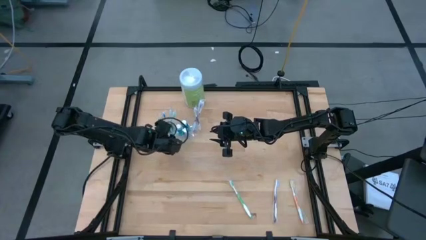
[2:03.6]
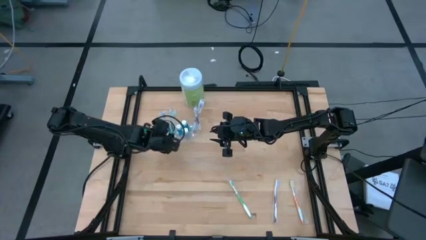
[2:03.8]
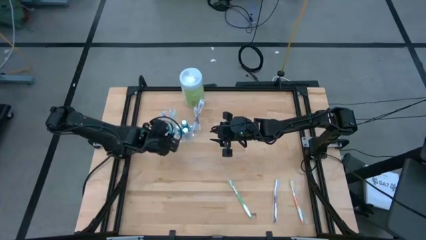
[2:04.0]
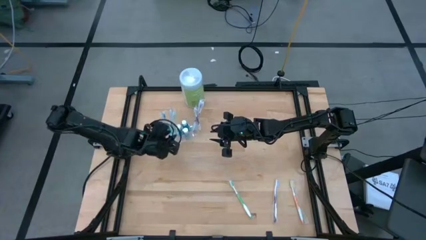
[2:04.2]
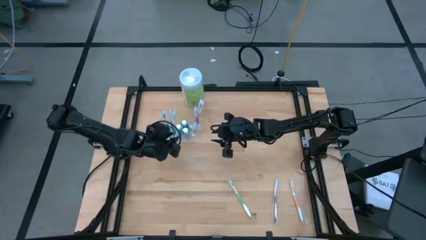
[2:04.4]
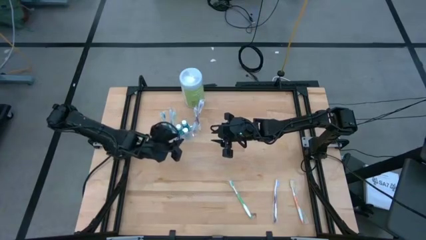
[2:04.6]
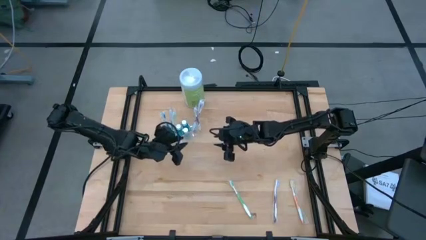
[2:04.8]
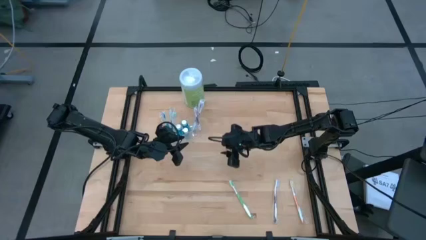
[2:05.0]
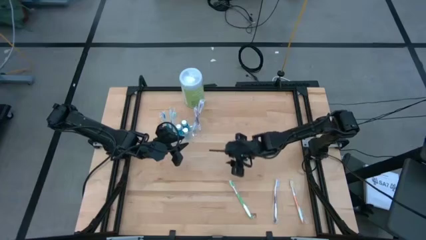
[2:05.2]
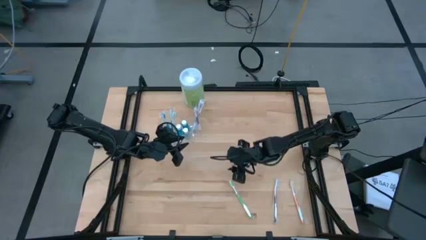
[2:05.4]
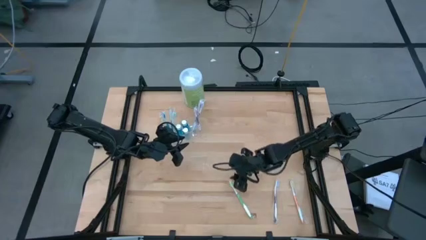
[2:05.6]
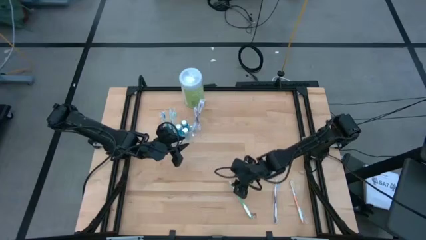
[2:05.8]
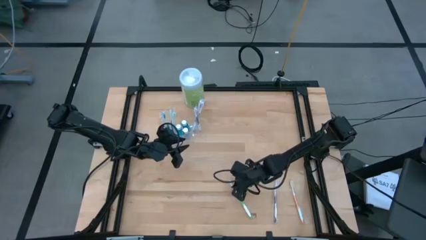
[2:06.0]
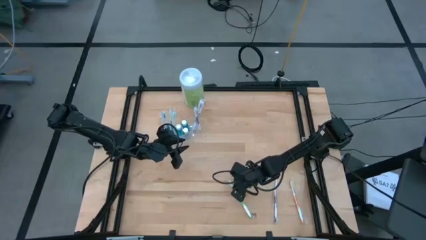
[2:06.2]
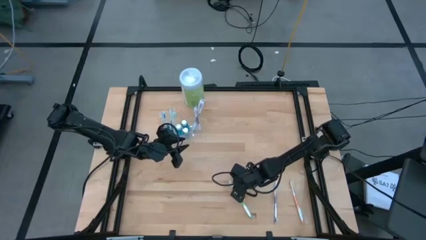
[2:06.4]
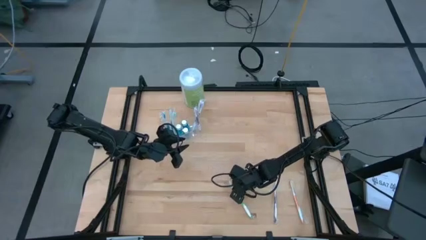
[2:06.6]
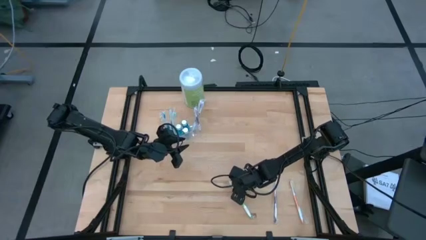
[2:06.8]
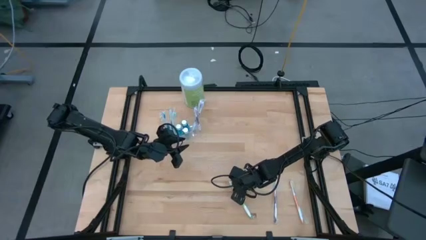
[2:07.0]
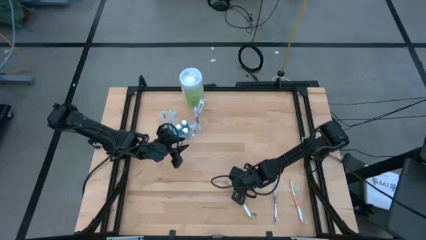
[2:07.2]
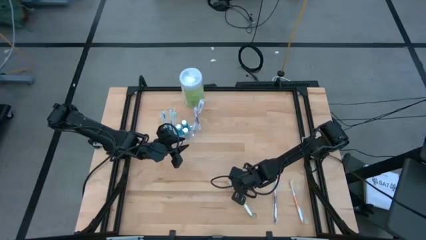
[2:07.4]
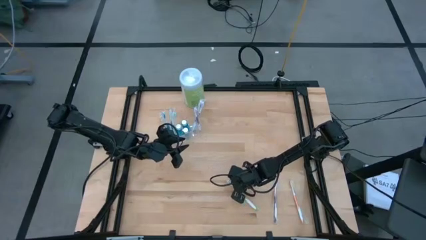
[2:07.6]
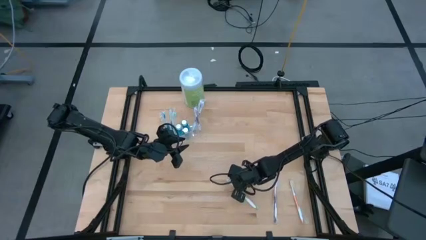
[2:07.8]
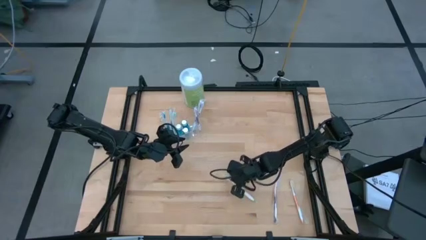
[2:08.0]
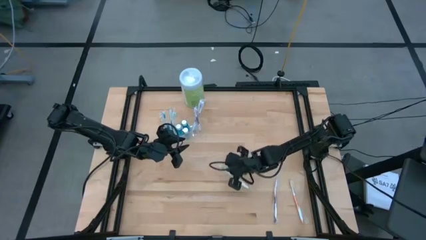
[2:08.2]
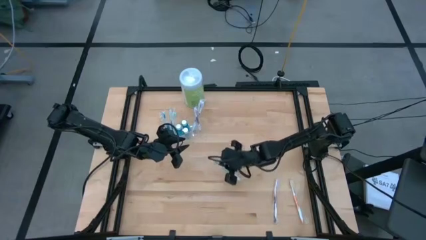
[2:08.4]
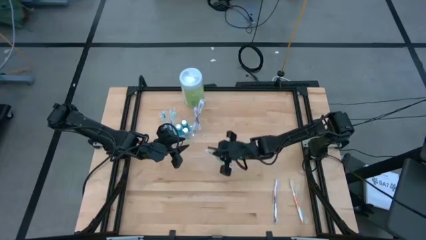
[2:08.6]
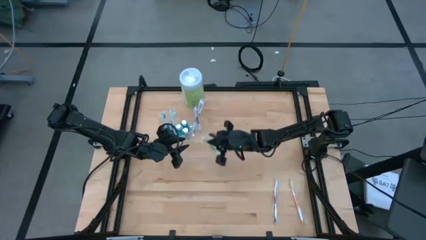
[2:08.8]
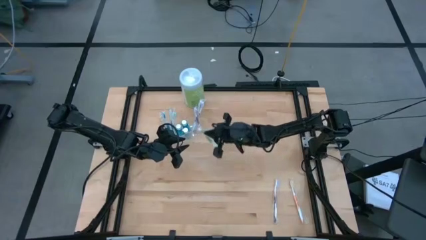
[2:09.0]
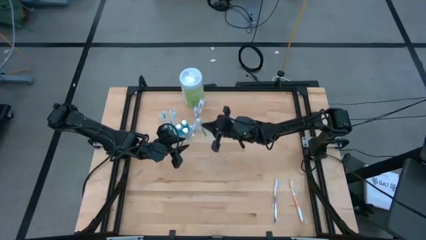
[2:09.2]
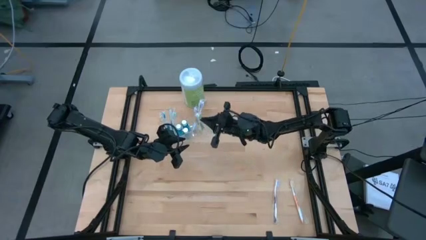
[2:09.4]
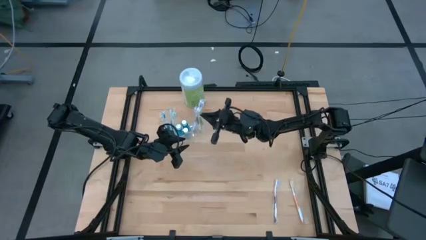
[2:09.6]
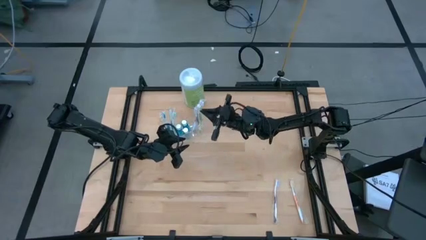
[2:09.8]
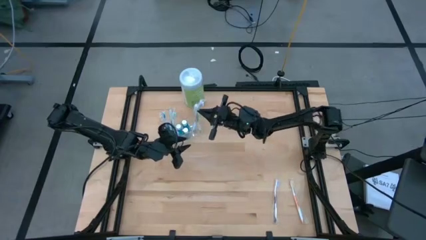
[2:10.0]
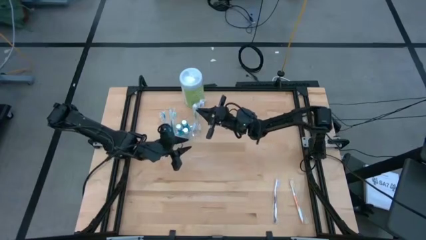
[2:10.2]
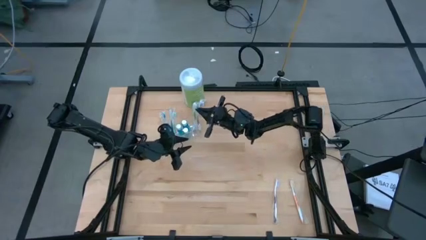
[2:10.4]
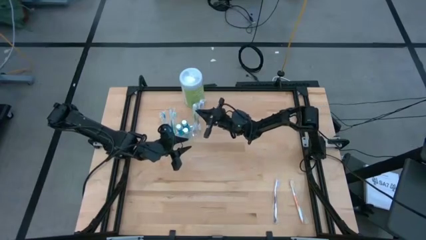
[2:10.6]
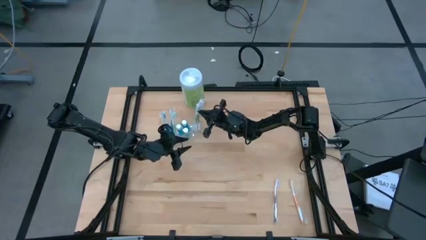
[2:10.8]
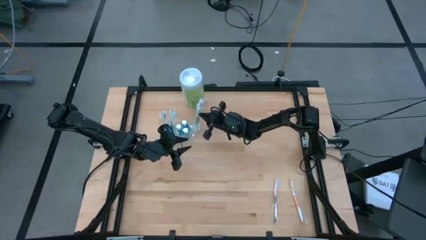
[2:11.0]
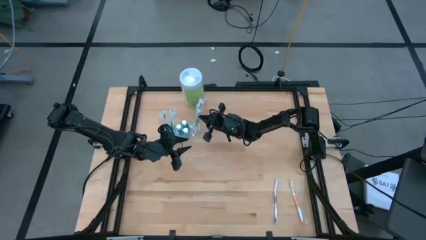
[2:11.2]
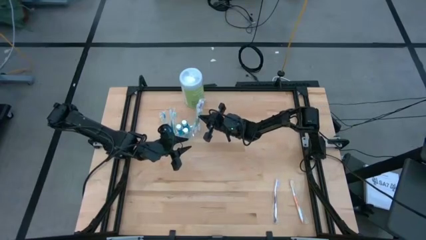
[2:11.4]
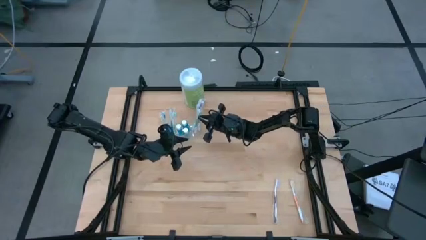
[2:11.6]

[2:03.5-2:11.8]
Task: Pick & Place toothbrushing station
Put the green toothbrush into the transparent organizer

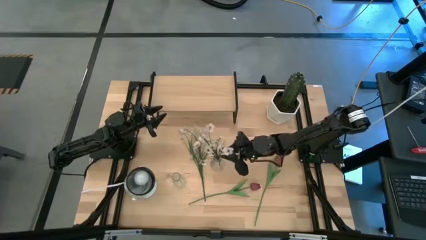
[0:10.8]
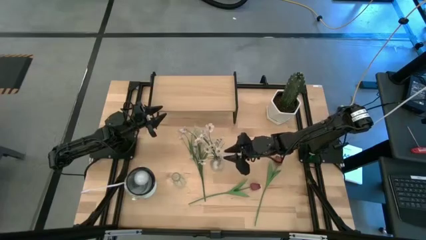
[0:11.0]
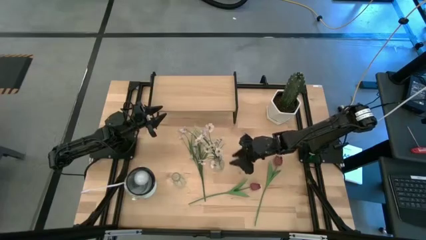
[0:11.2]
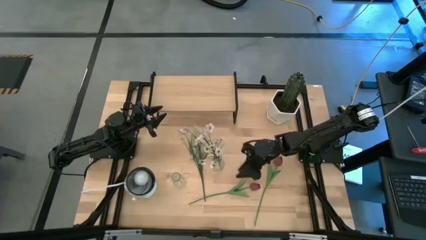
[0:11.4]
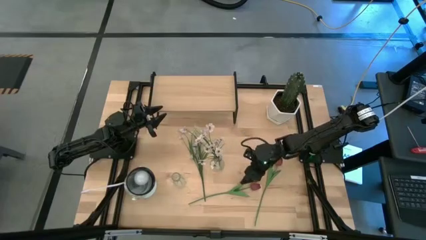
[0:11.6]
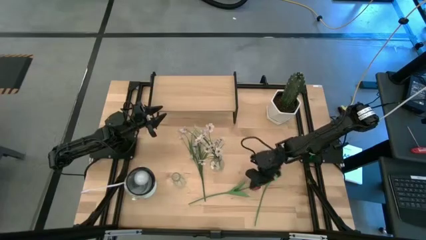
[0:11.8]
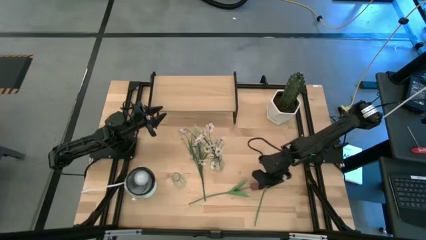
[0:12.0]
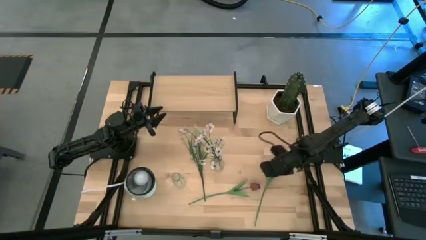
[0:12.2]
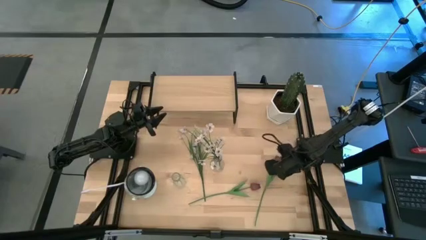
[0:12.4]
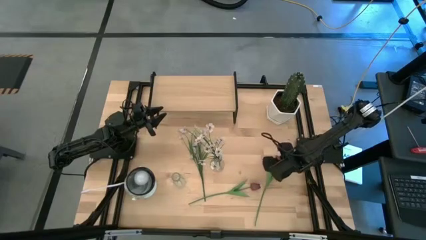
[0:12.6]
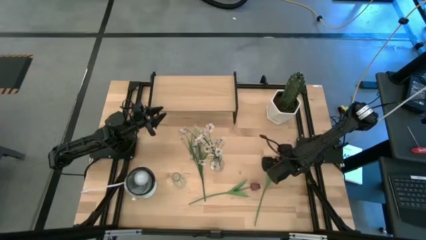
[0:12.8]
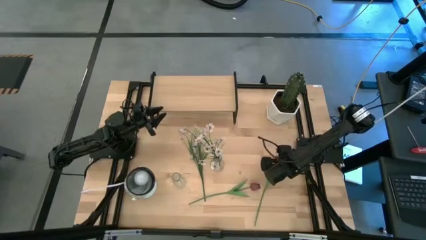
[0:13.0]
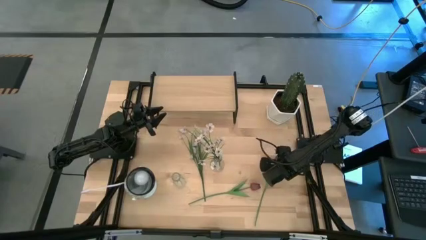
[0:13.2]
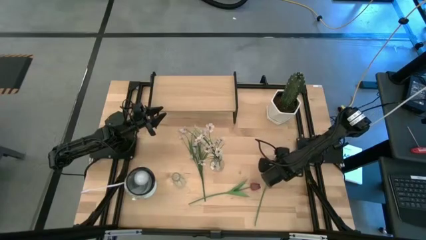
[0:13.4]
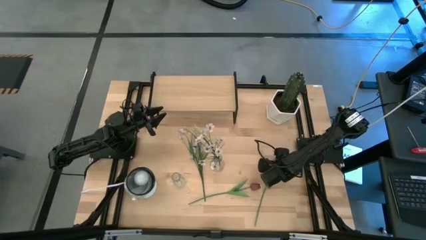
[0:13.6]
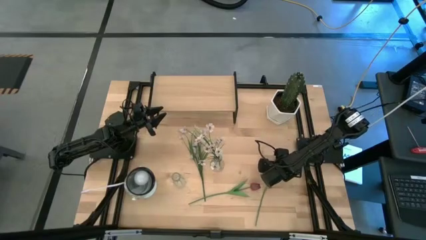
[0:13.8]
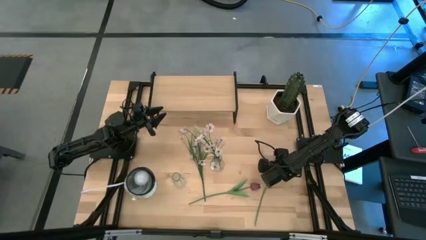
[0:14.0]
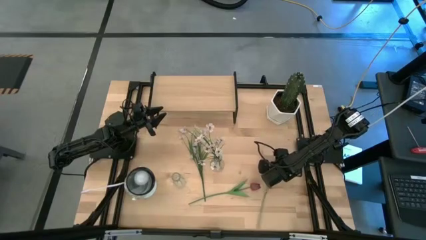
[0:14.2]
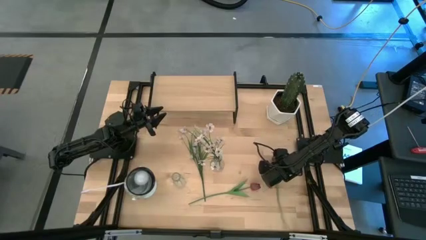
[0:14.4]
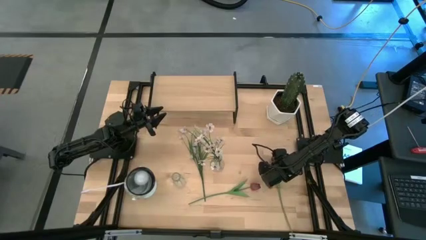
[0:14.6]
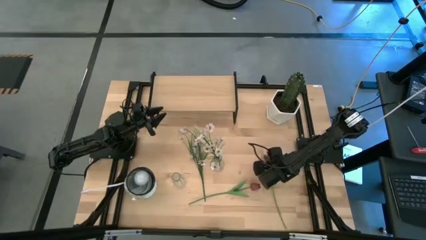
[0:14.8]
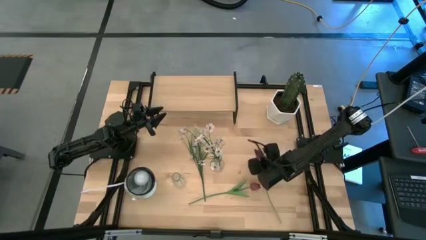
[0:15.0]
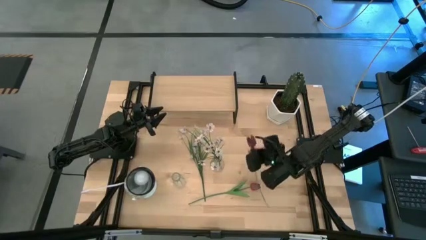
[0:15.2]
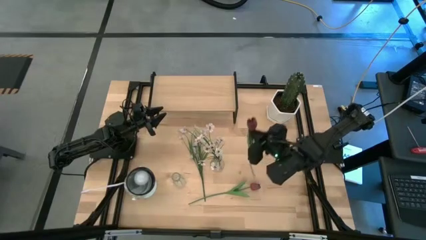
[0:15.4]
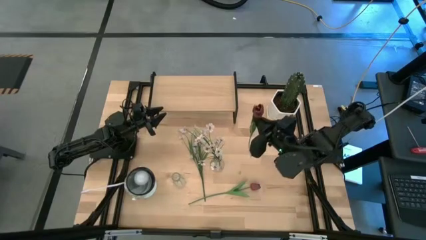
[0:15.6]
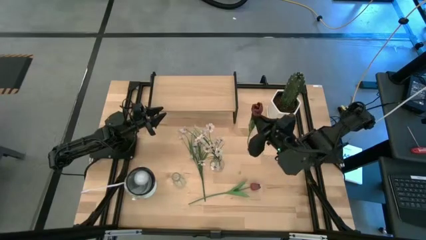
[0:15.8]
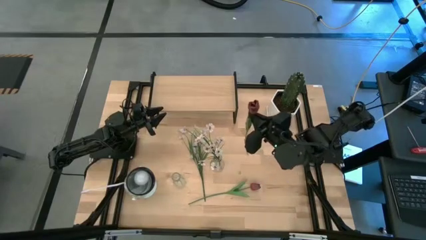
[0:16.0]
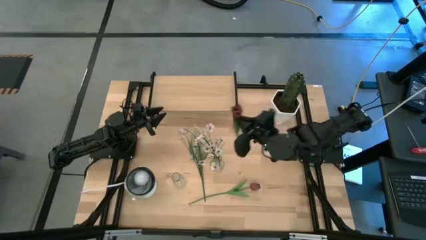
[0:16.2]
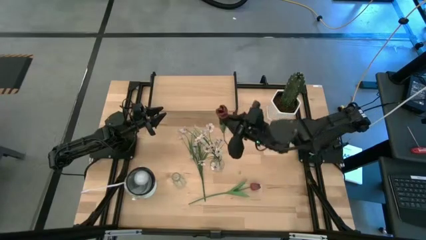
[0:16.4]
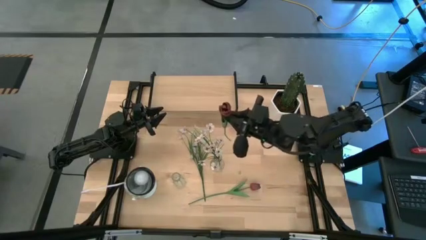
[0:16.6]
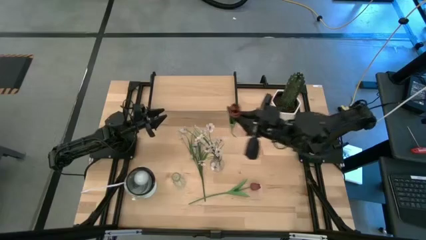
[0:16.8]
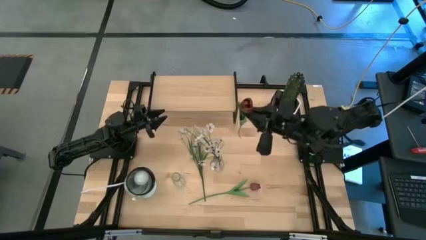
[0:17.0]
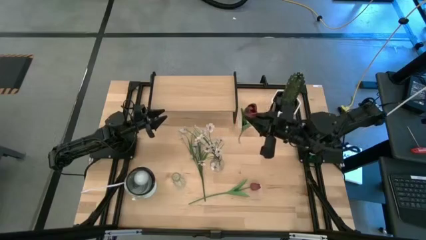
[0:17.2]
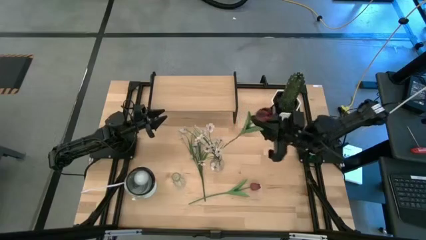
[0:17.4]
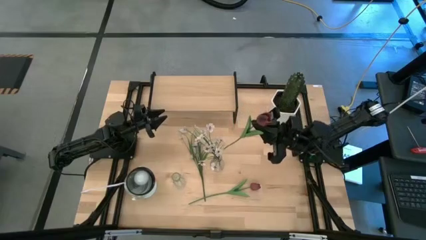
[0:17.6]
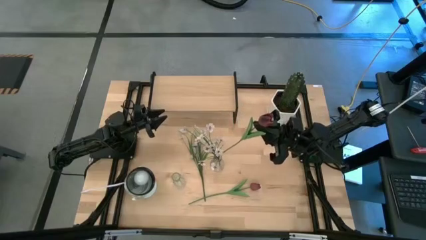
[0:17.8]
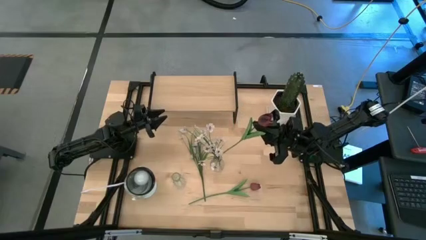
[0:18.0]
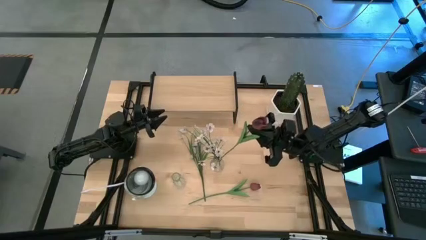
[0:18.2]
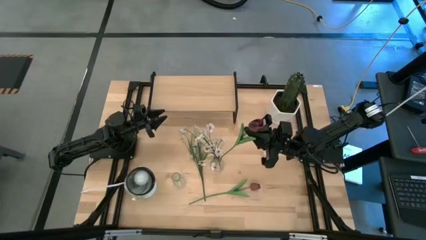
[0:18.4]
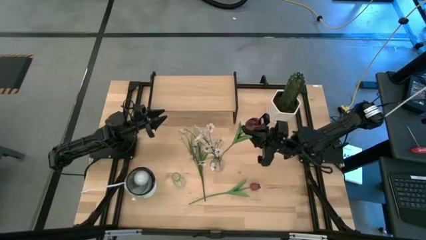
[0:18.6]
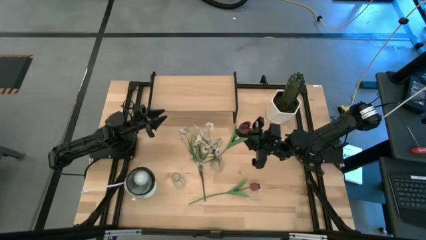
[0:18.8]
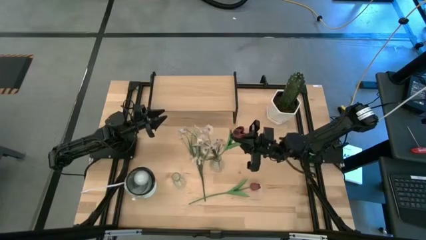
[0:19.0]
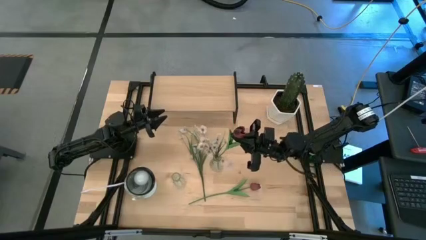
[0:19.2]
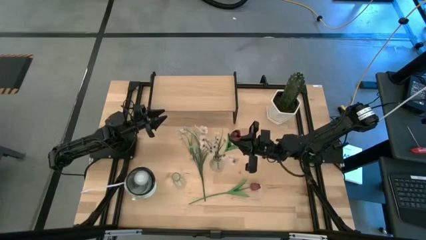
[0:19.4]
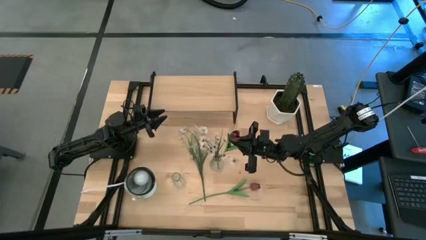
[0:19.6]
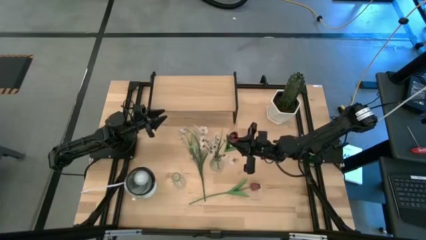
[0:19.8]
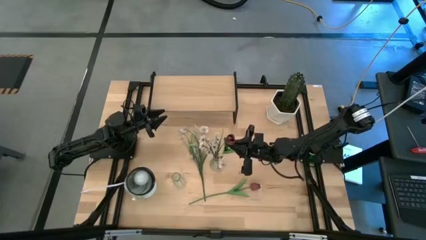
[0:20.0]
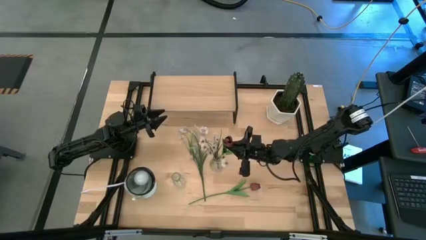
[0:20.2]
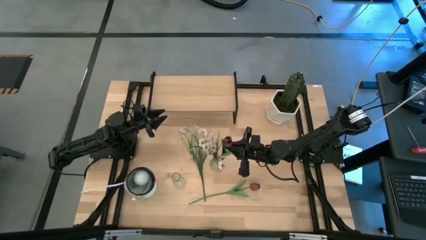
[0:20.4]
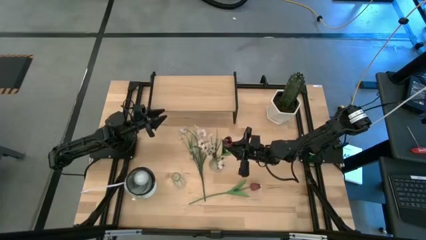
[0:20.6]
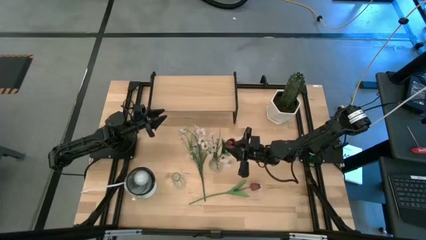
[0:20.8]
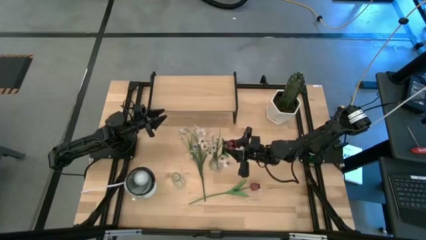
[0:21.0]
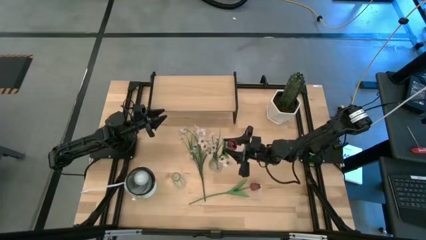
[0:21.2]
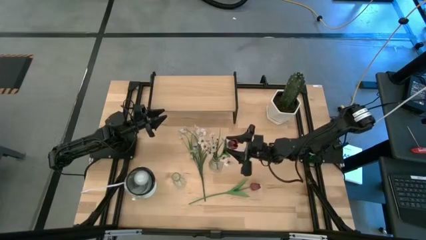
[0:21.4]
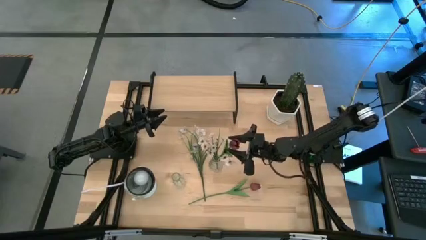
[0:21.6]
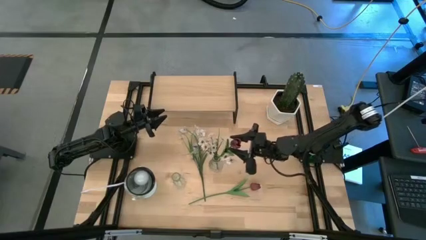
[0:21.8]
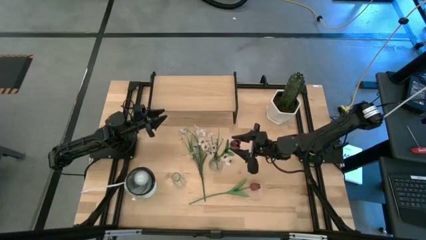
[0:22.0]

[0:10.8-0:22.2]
Task: Pick and place flowers into a vace then onto a shelf
Put the right red flower into the right transparent vase
